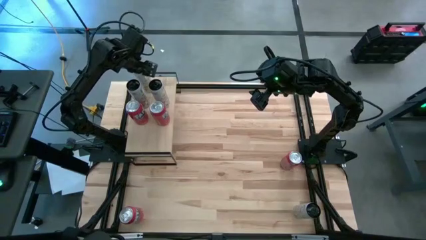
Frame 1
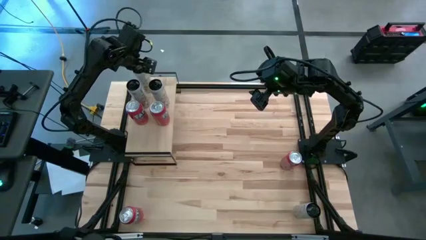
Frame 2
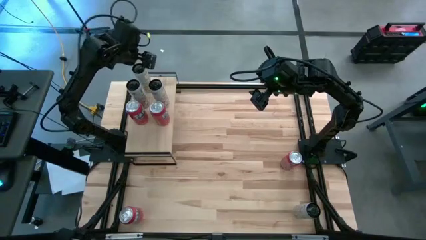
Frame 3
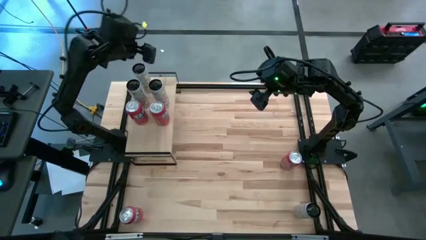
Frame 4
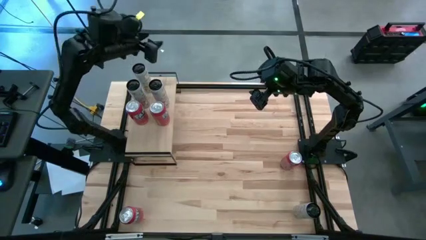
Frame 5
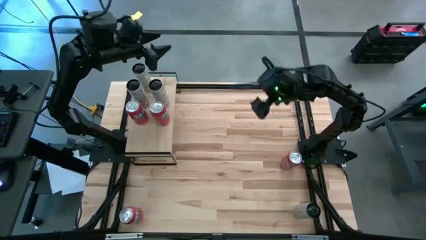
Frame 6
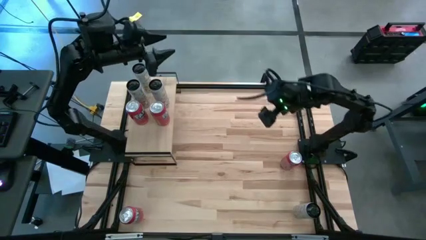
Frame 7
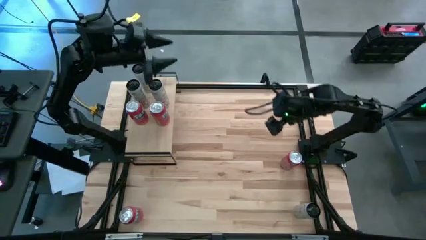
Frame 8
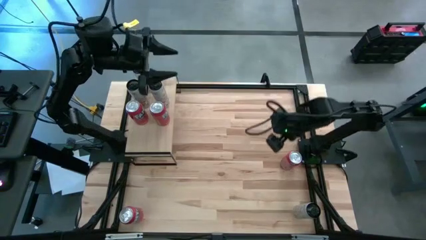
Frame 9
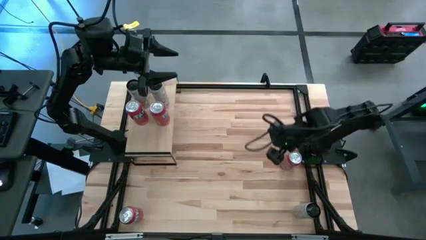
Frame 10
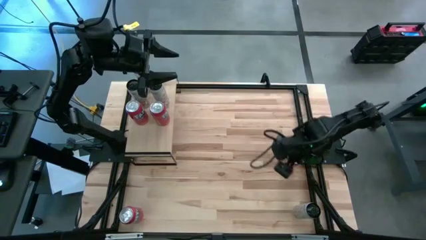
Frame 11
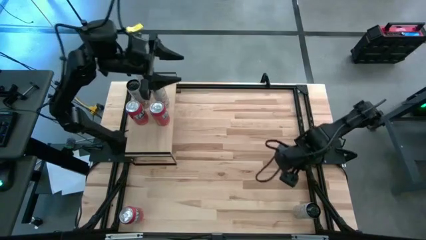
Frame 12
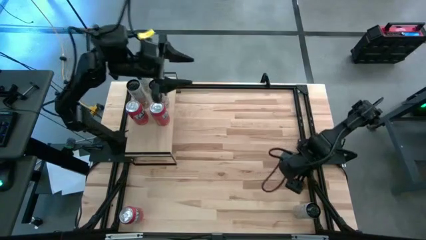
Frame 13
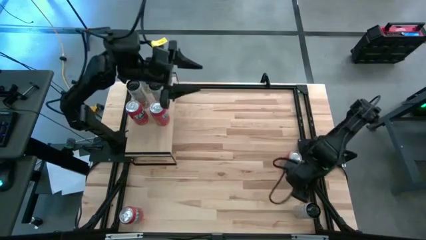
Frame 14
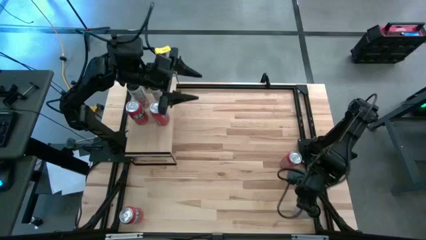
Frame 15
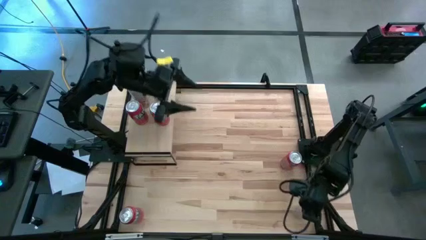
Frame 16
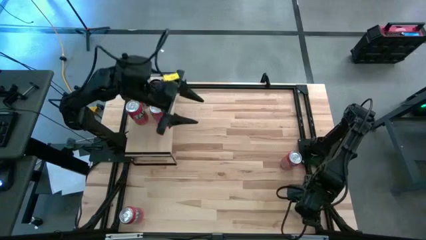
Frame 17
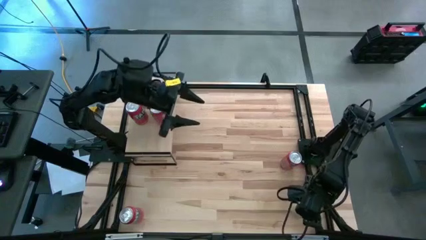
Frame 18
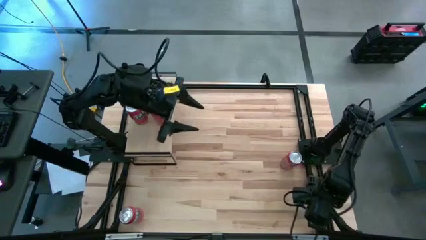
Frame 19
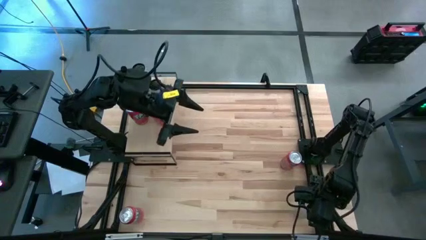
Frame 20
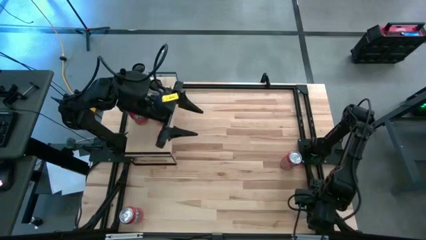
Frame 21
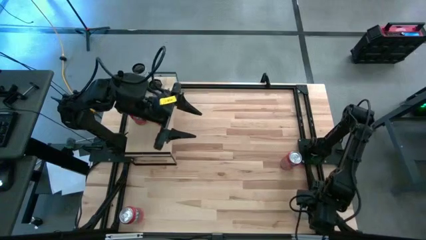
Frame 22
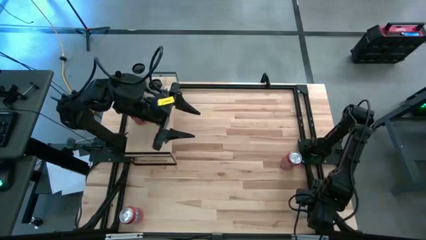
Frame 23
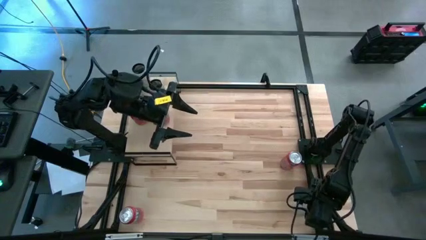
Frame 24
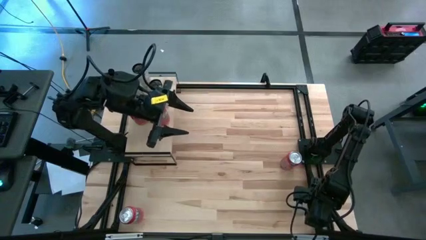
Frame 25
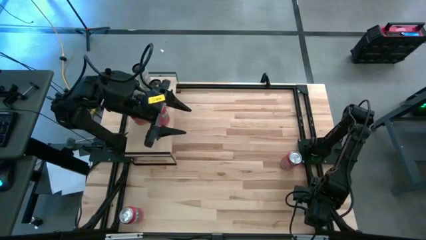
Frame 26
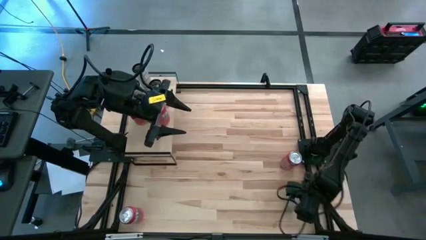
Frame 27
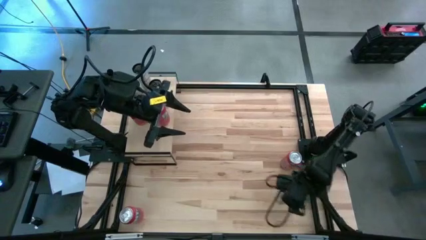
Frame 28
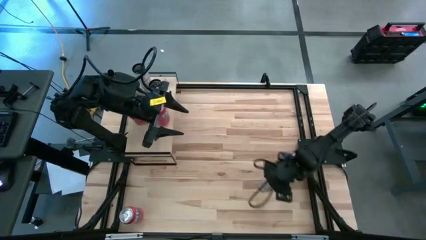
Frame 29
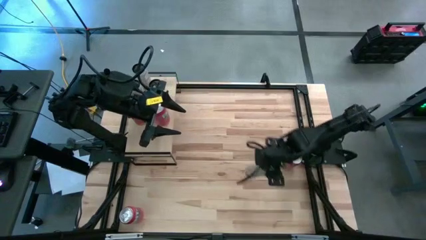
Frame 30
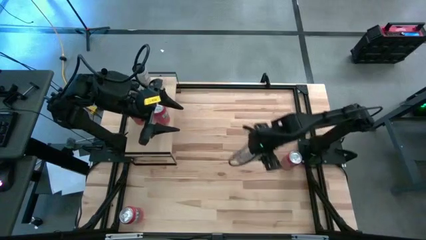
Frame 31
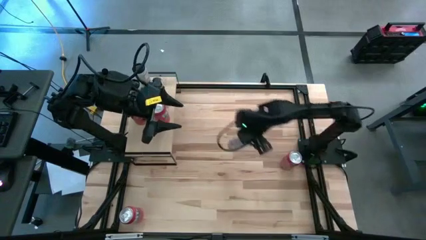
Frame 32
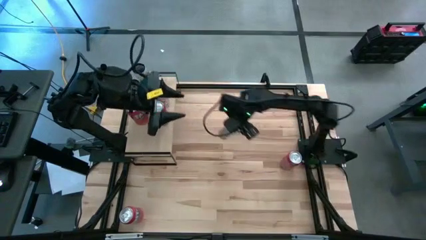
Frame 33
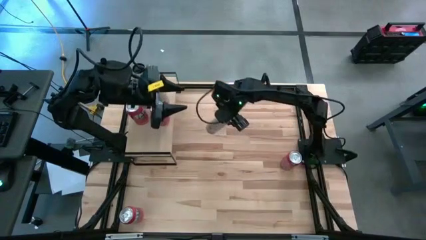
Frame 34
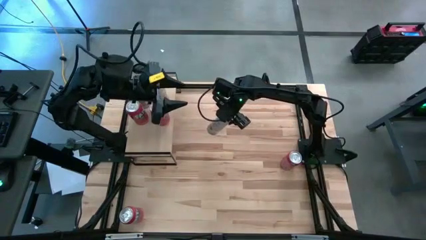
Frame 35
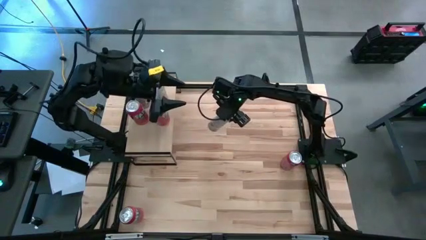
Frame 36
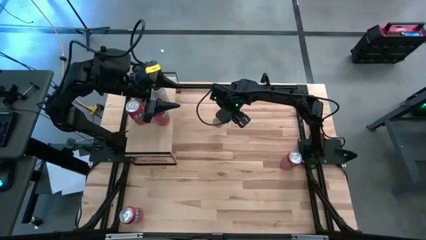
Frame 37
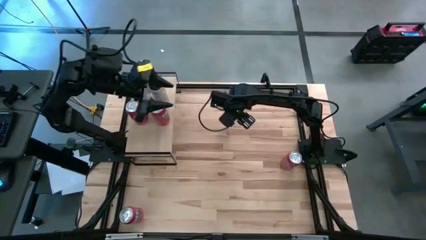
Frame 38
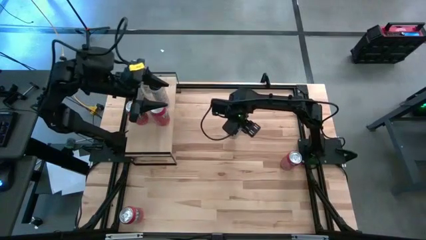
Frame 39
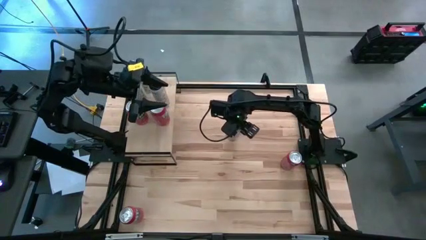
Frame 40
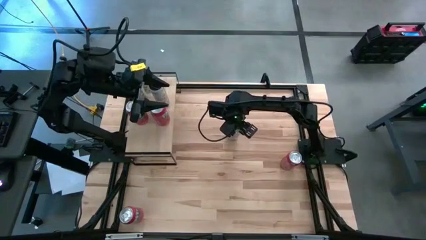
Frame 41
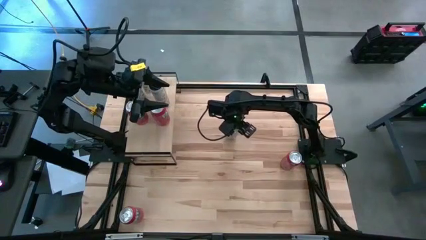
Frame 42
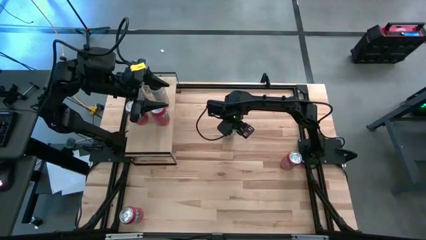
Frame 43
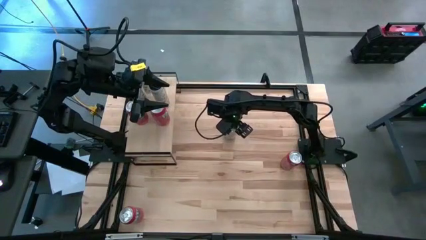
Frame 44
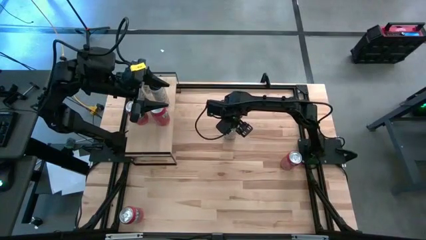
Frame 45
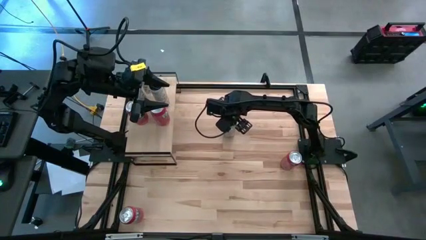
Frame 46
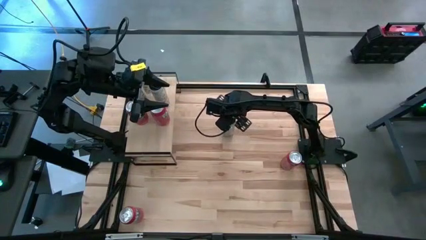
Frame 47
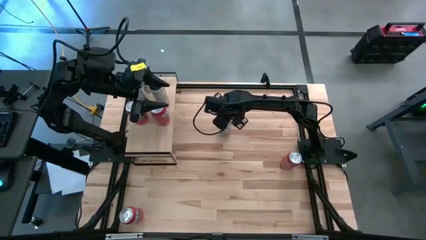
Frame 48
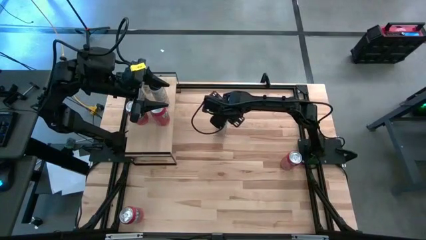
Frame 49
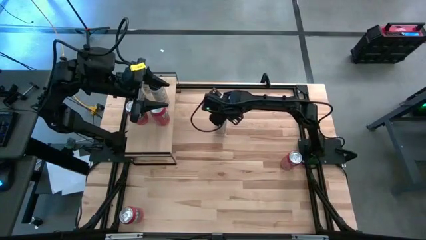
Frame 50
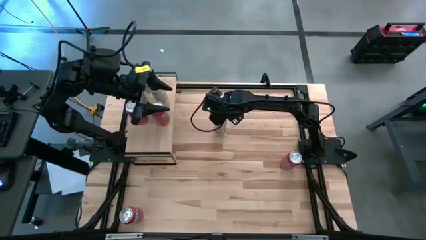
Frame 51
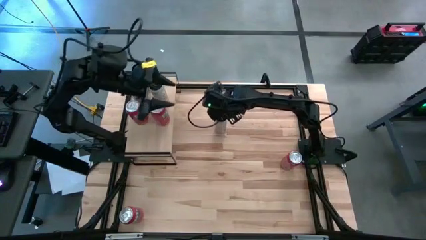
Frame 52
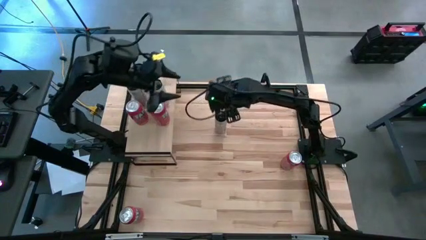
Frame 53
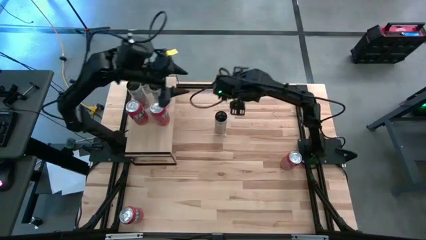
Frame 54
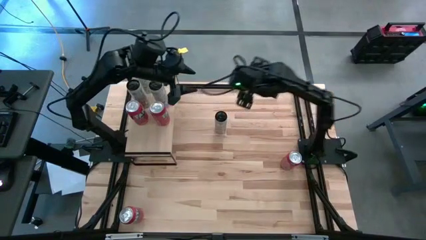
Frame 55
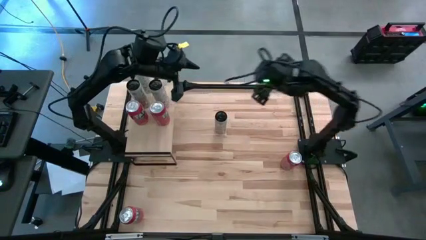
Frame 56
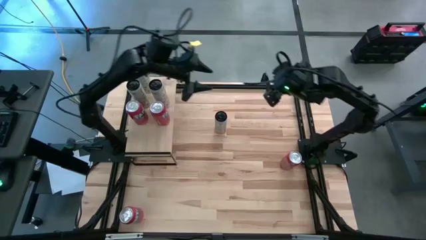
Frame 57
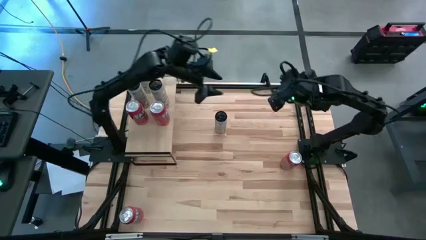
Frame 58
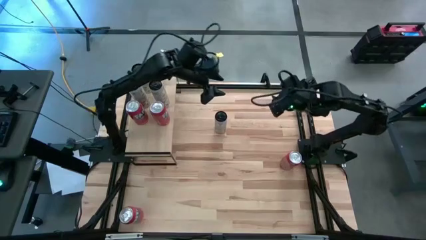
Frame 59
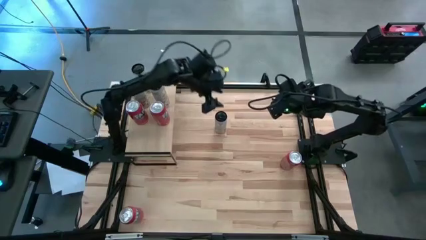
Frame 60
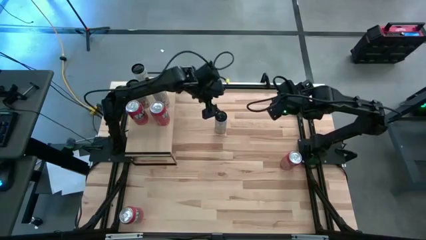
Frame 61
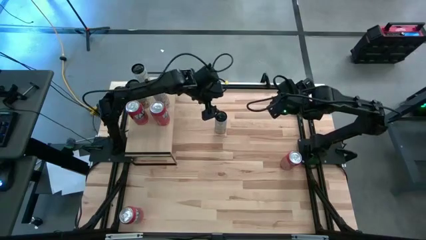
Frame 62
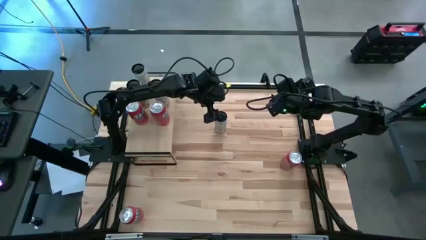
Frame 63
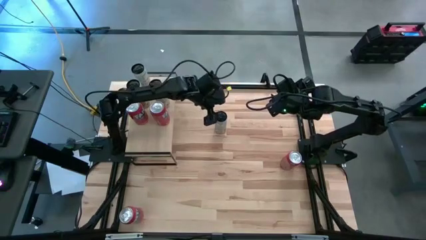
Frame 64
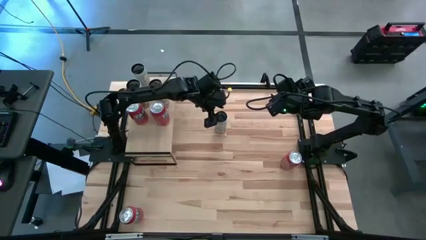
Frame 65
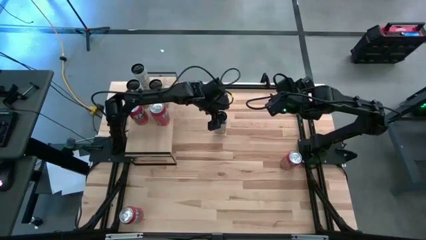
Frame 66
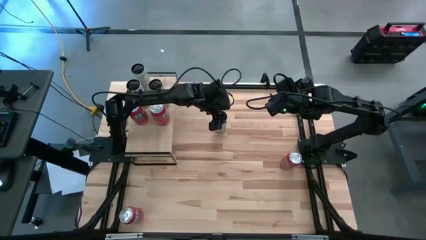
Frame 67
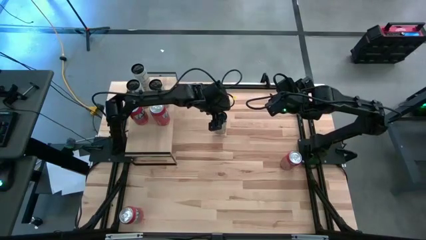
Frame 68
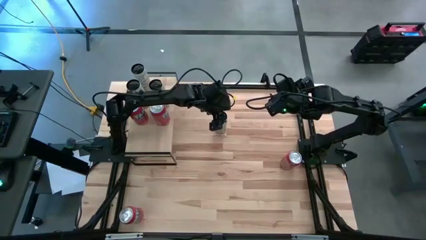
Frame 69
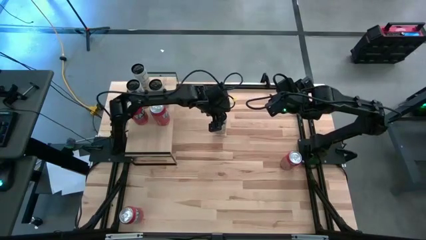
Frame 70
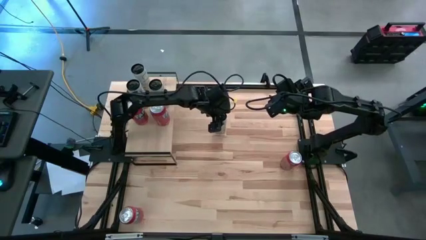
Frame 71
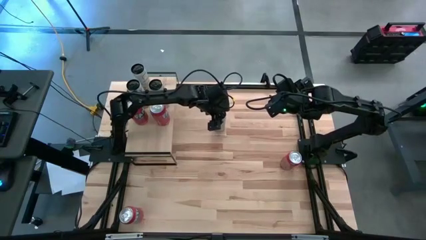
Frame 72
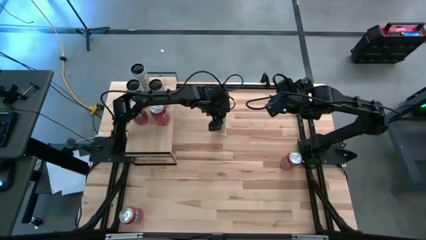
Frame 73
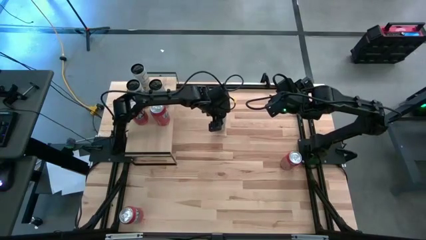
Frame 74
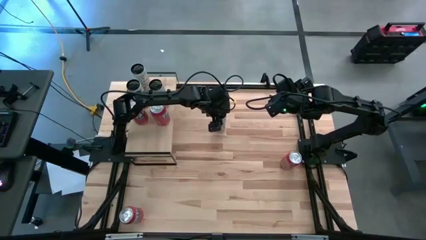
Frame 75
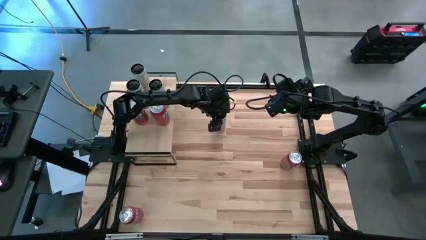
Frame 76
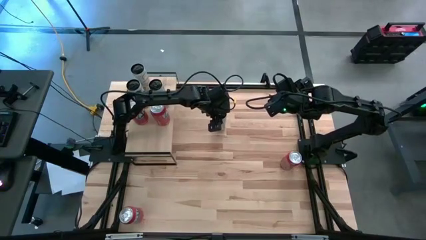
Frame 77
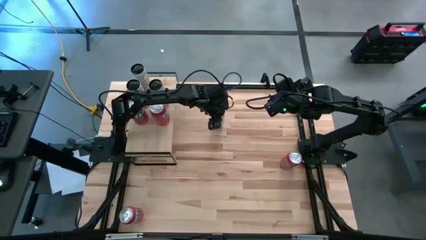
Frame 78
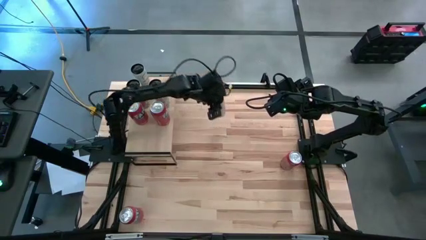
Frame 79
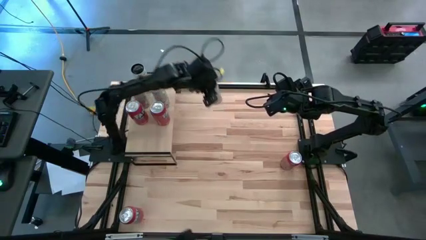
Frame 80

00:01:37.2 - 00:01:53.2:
Task: Place canned beverage on shelf
Put the white yellow soda can on the shelf aligned with the other white yellow soda can
